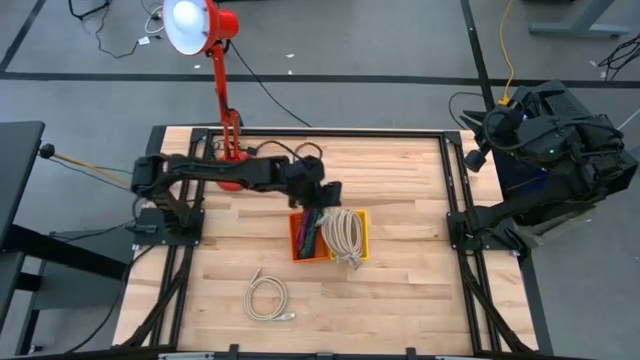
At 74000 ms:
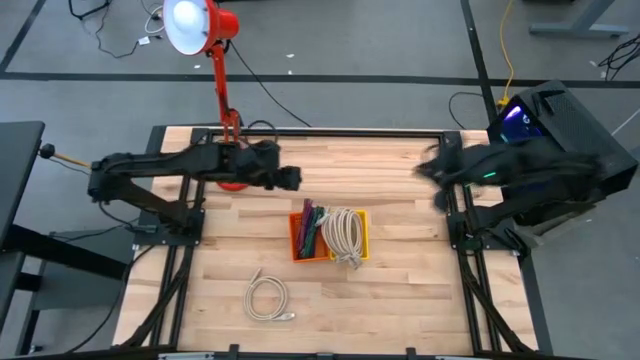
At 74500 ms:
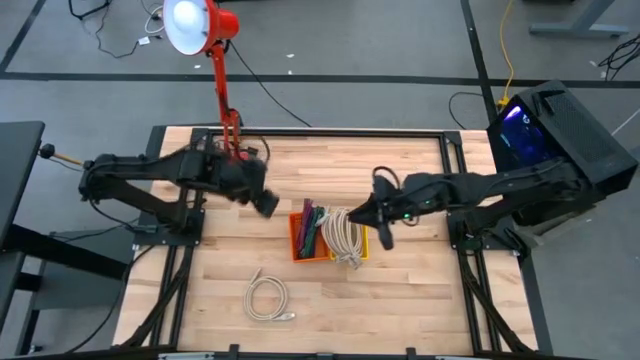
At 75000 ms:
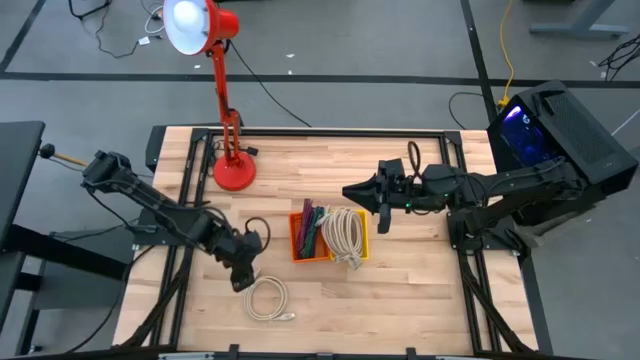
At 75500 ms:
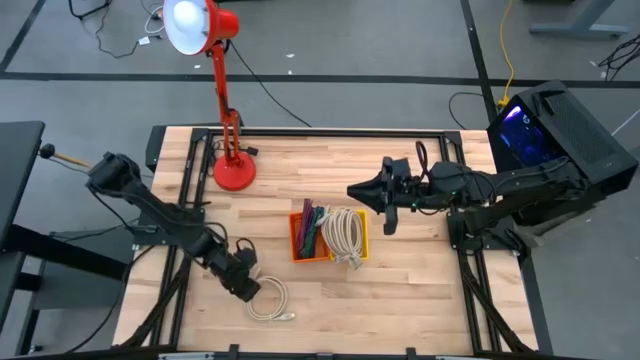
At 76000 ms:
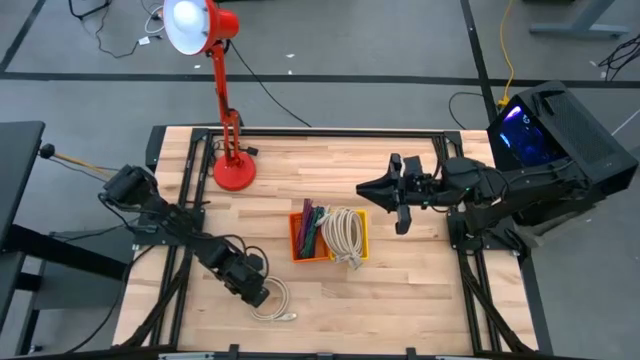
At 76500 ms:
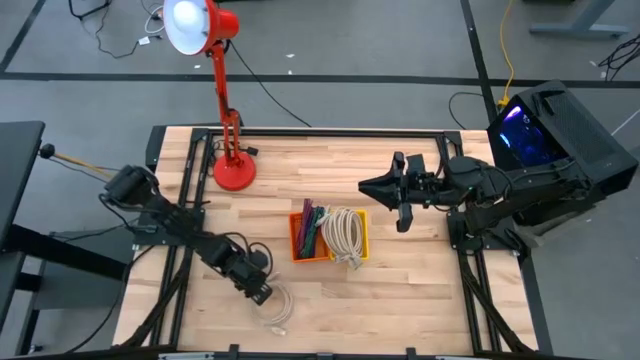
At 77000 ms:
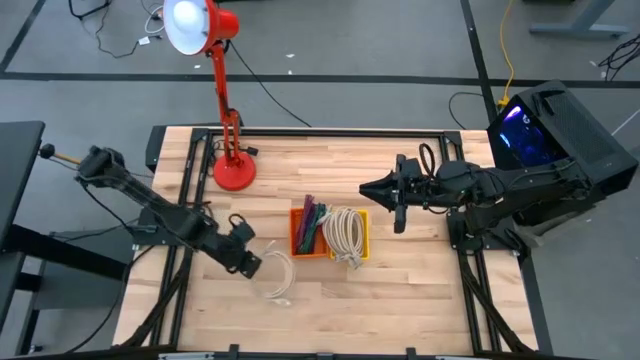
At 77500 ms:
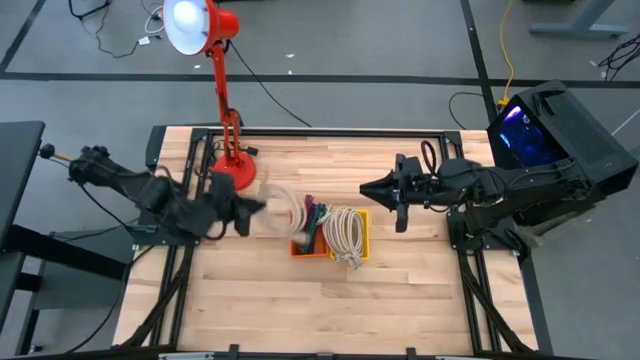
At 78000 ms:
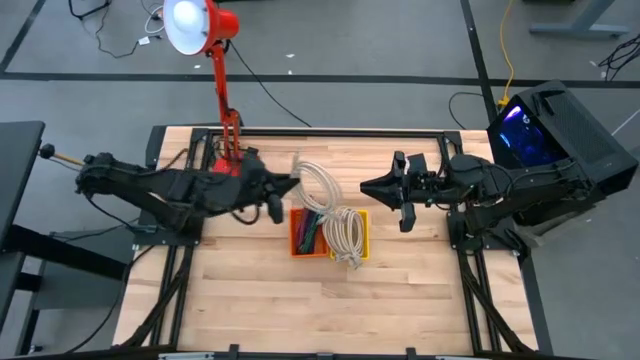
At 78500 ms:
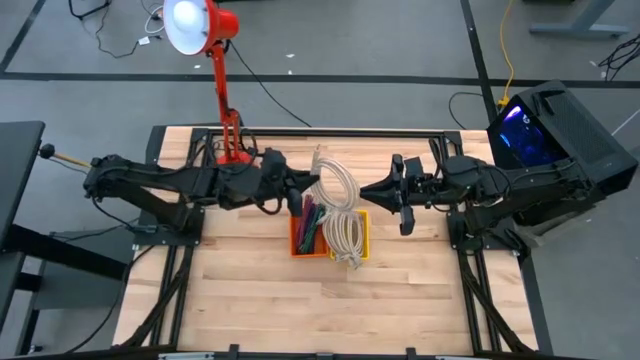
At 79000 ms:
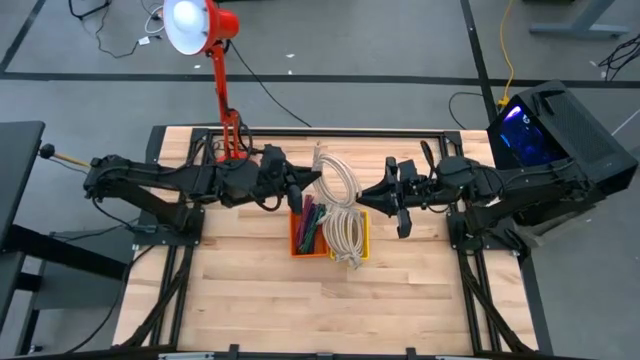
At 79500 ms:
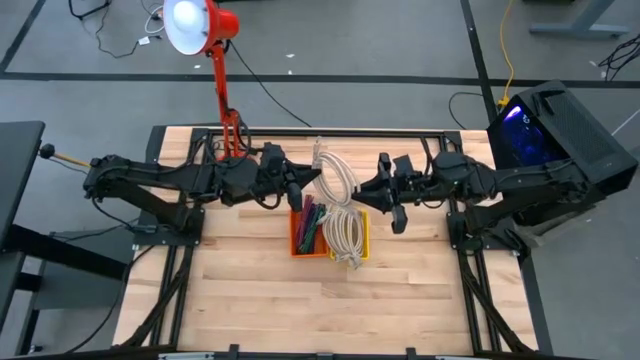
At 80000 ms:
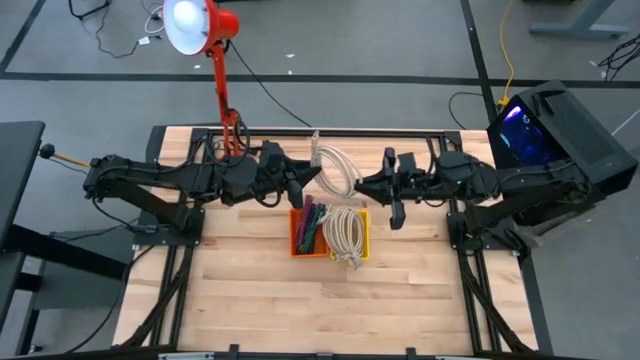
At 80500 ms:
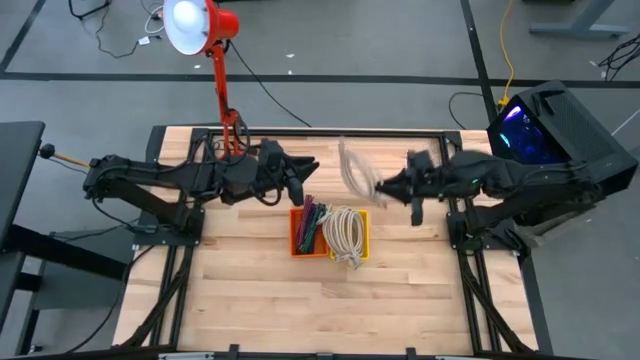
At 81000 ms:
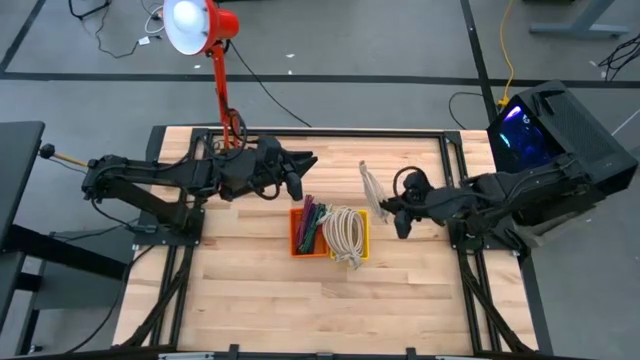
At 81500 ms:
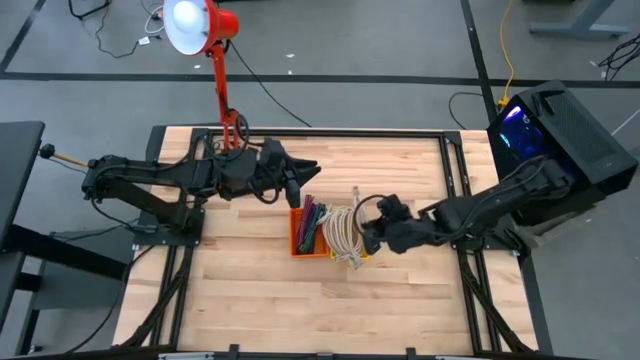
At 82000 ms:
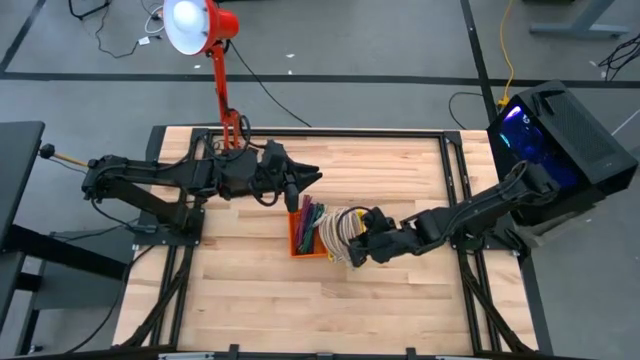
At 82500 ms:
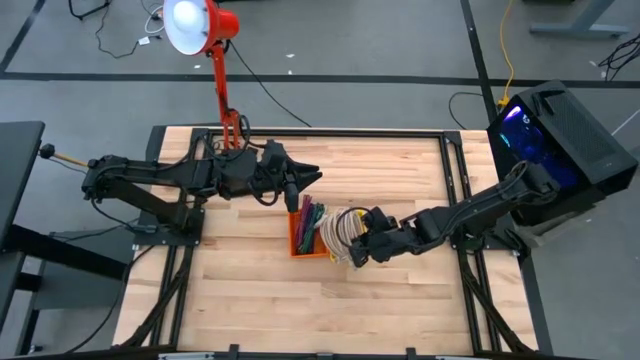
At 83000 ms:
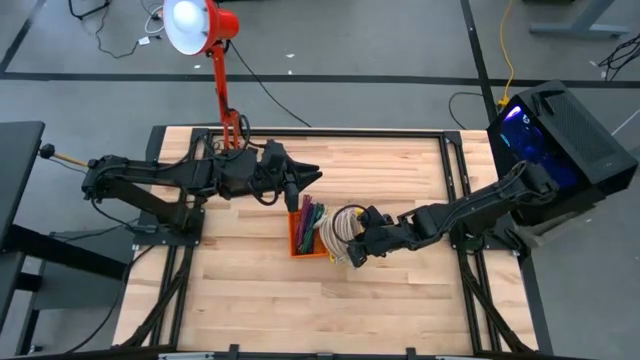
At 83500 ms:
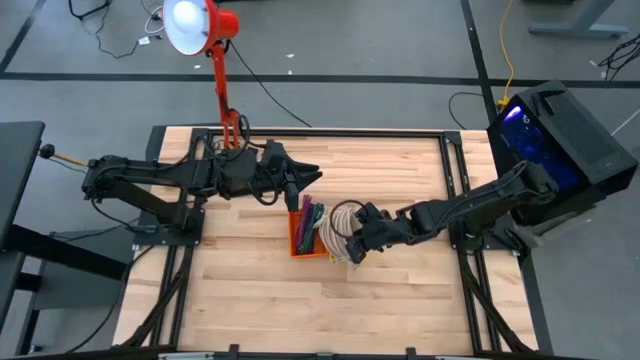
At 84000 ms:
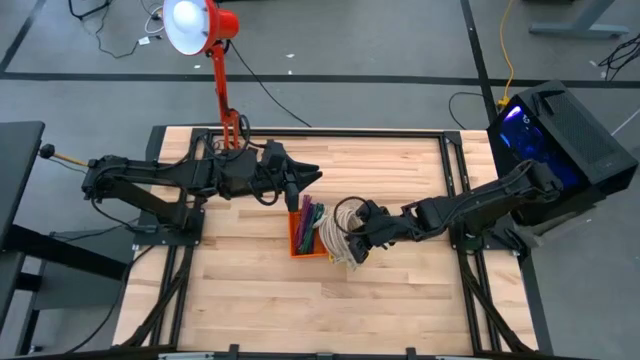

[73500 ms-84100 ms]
Task: Pick & Place USB Port
Put the light brown HDMI cable into the yellow bin

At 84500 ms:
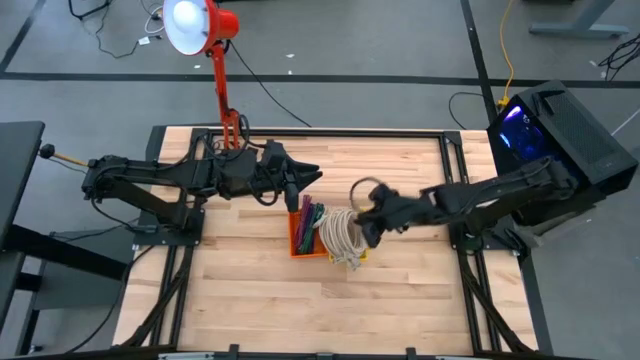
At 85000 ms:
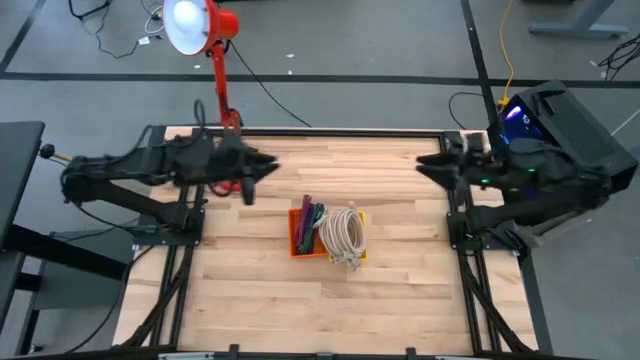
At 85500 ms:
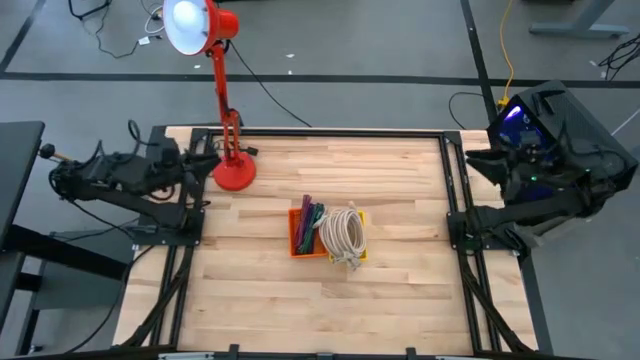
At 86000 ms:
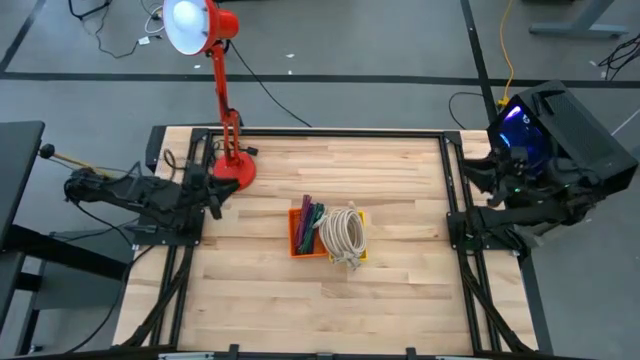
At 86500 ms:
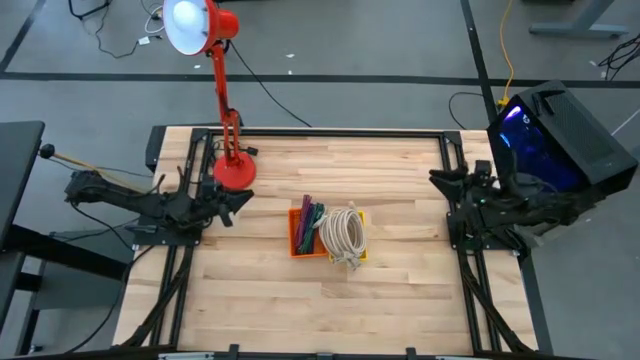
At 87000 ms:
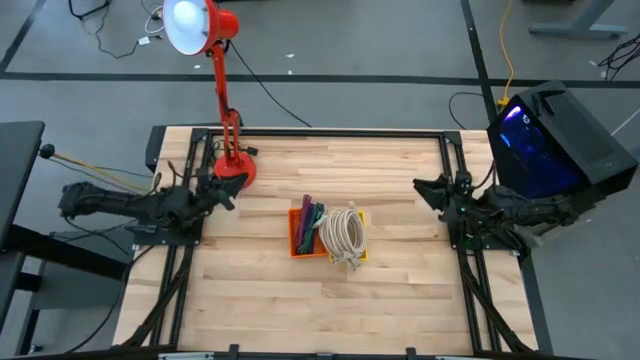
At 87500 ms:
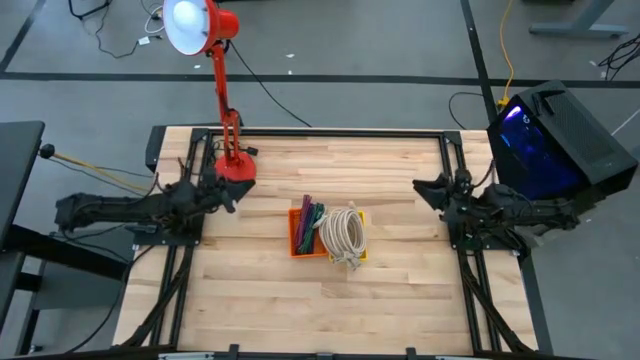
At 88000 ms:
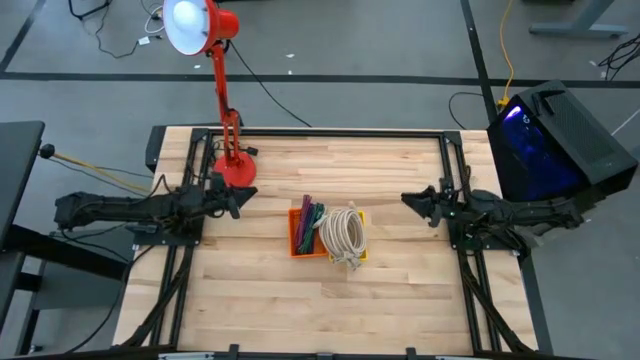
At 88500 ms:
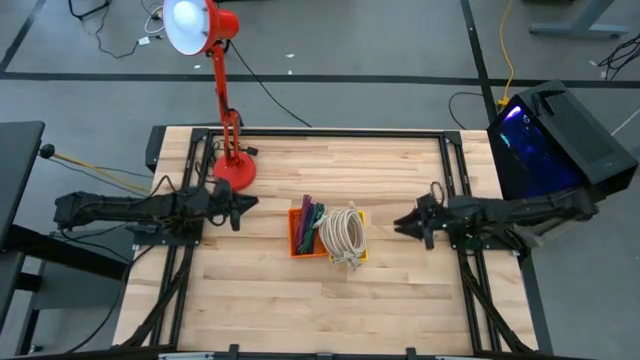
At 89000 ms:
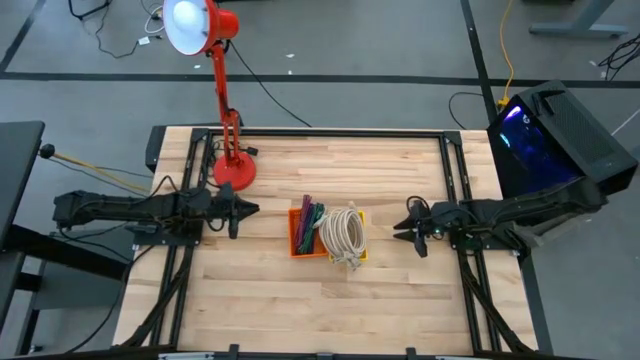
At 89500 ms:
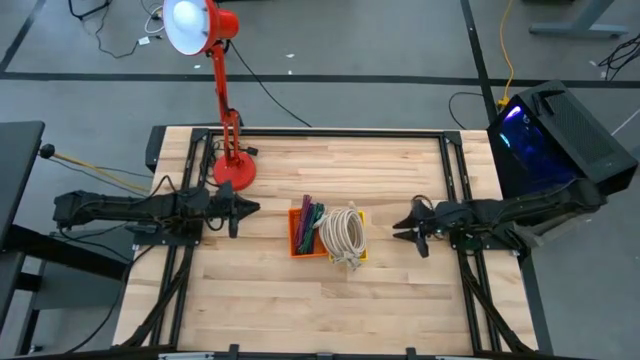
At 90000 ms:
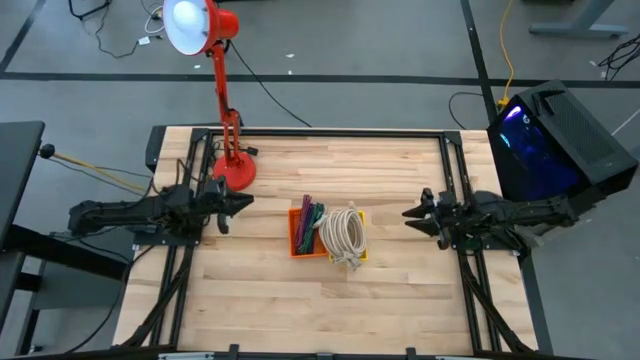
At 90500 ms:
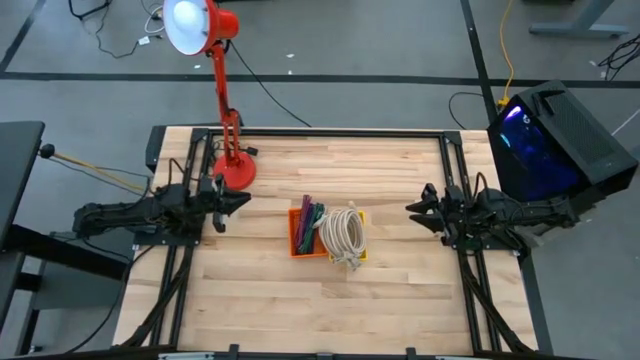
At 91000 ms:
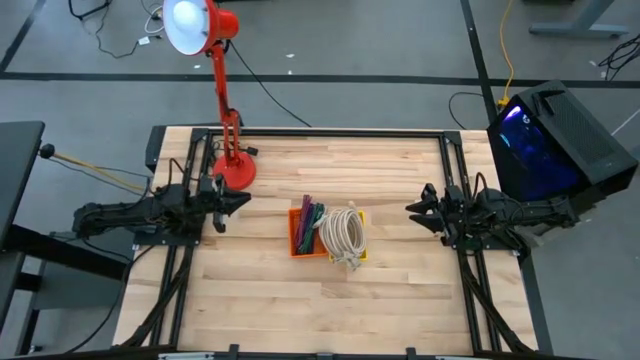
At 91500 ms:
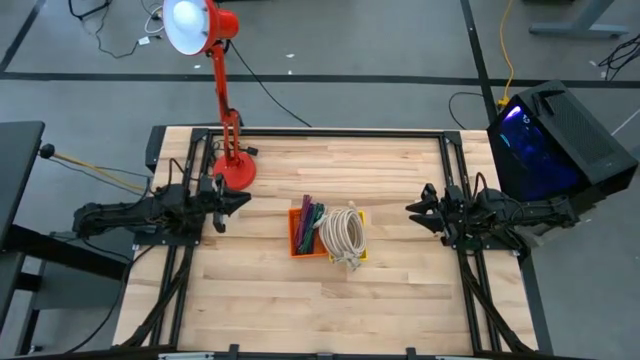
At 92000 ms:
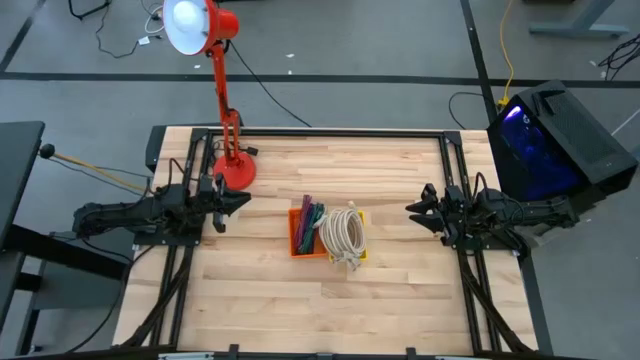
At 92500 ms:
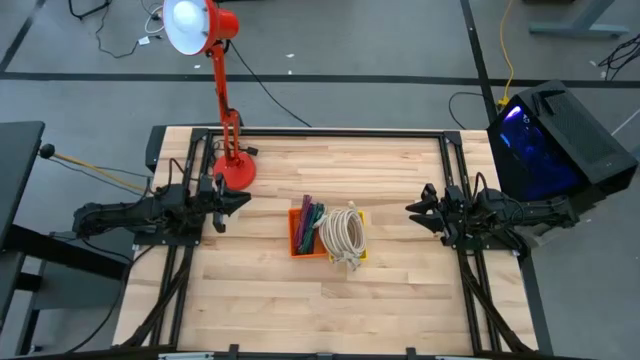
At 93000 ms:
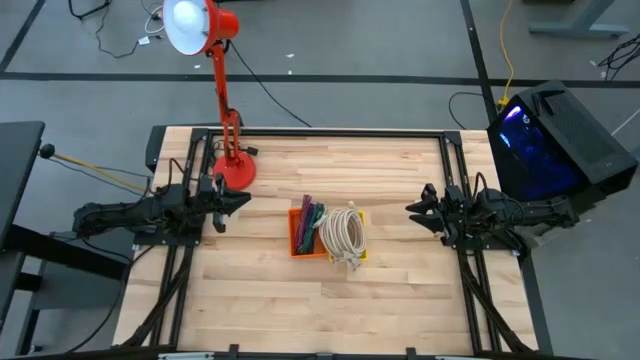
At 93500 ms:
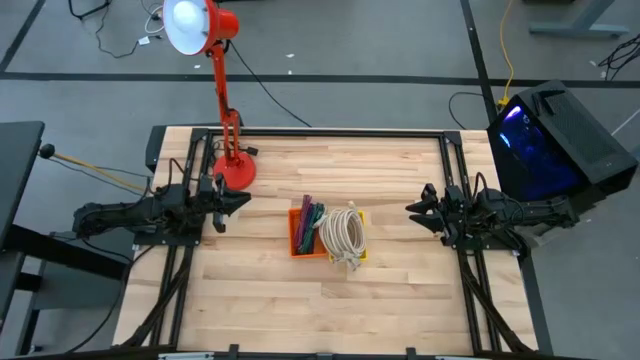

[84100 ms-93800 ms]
Return to Home Position

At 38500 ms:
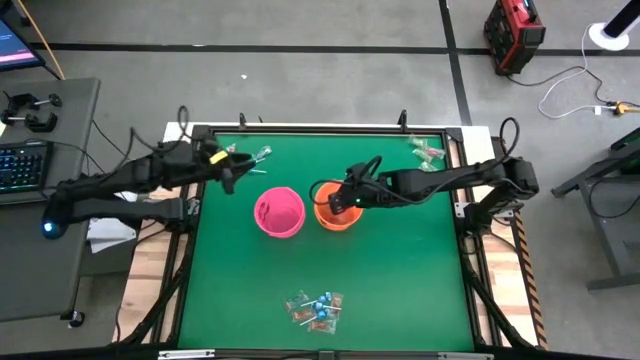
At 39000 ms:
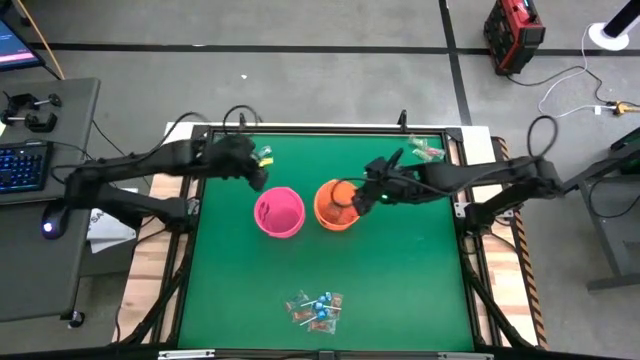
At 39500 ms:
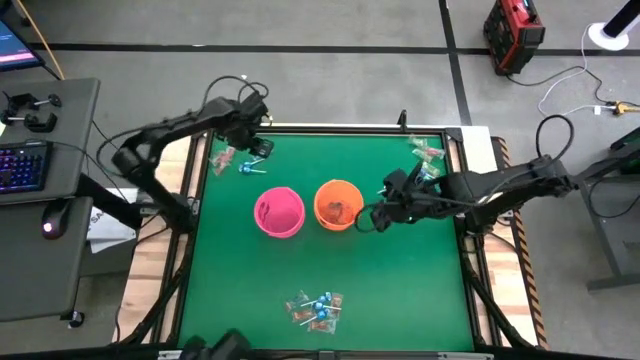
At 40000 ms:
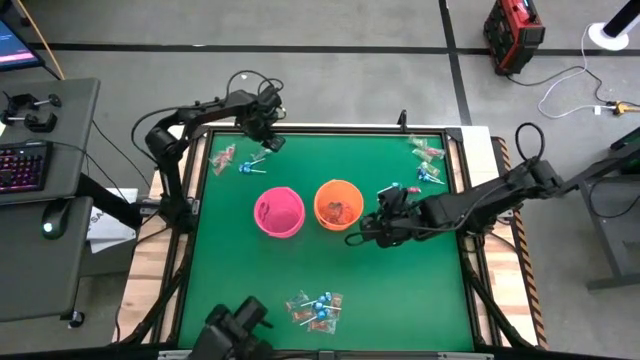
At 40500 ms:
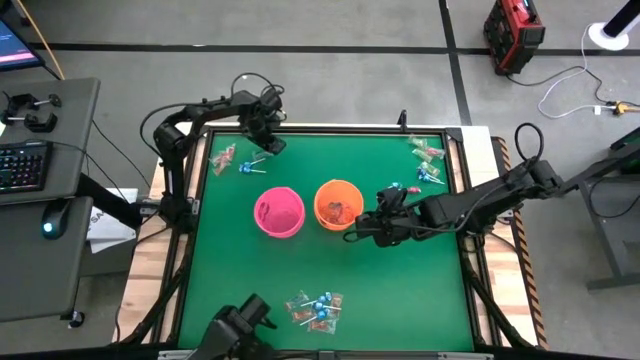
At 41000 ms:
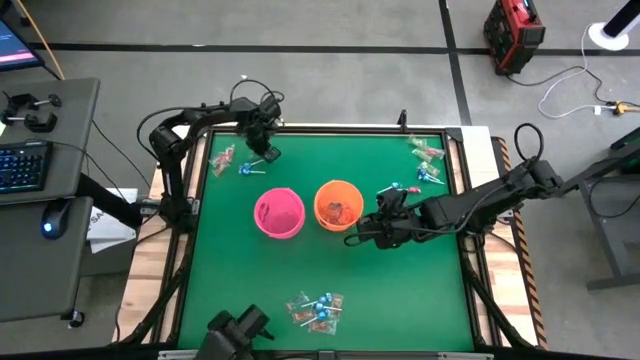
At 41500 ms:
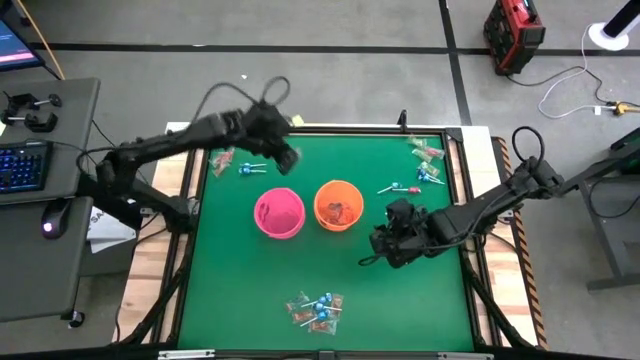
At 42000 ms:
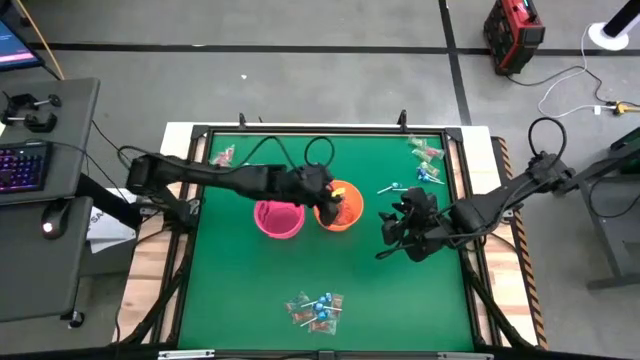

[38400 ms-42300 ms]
Task: Sort candy by brand, put in halloween buckets
Put the blue gummy into the orange bucket
